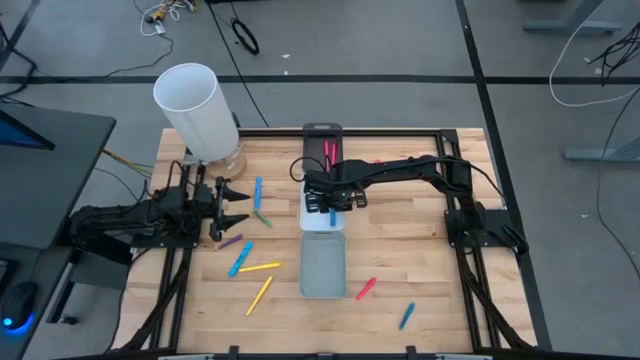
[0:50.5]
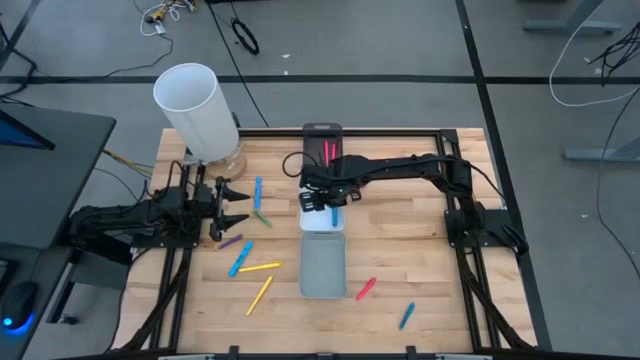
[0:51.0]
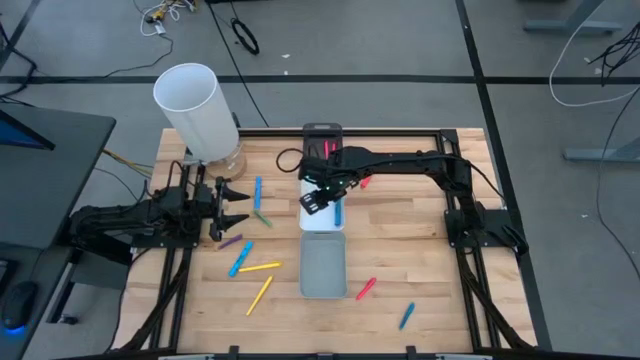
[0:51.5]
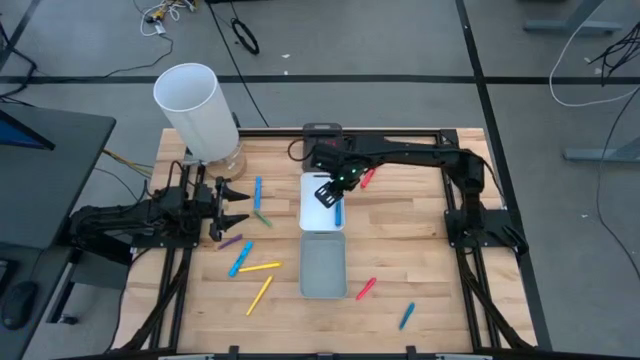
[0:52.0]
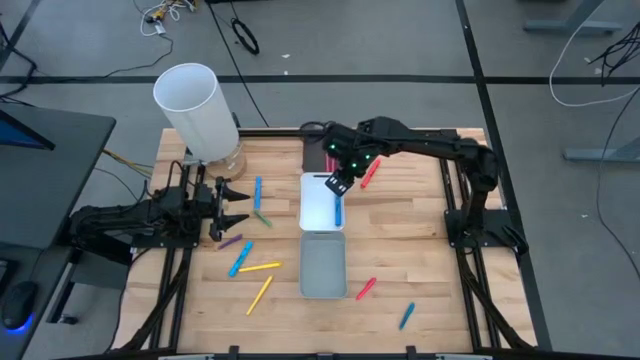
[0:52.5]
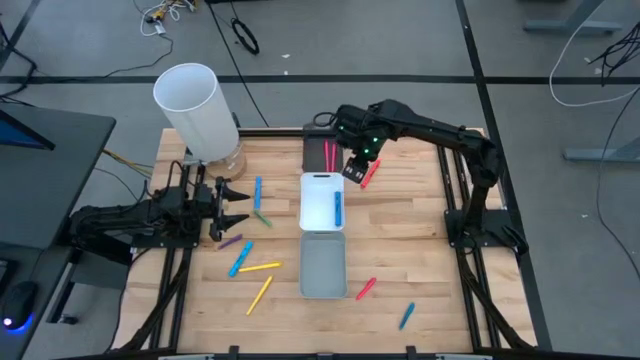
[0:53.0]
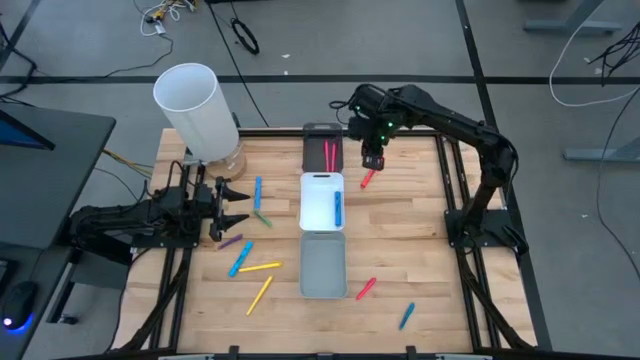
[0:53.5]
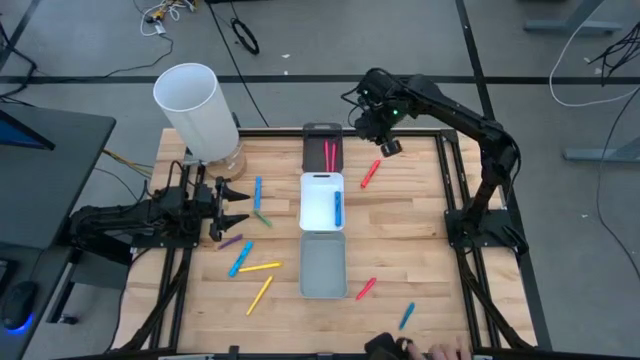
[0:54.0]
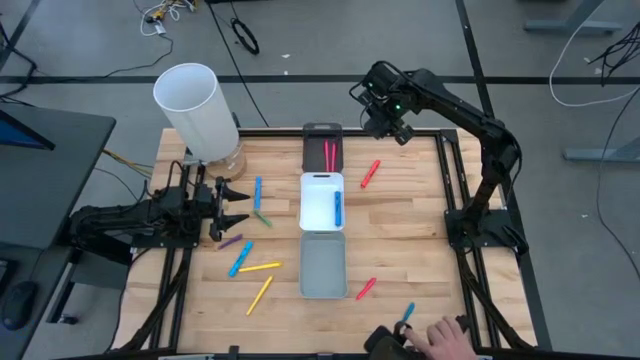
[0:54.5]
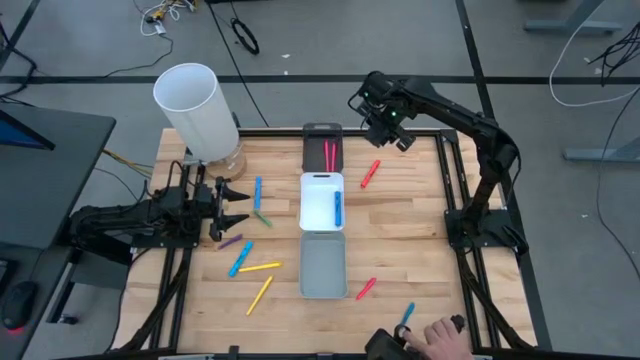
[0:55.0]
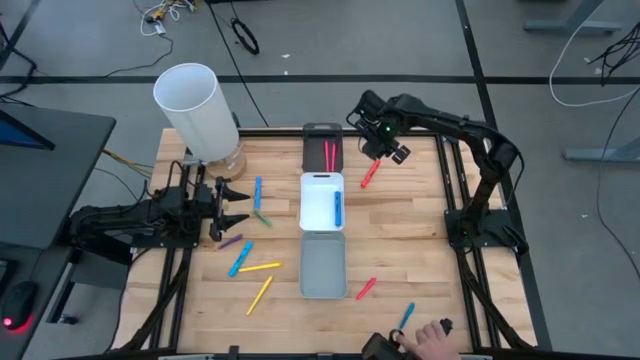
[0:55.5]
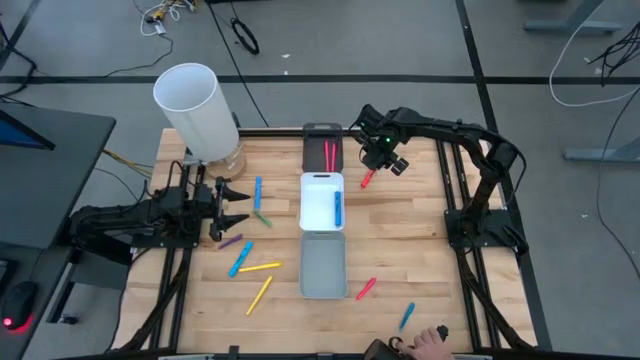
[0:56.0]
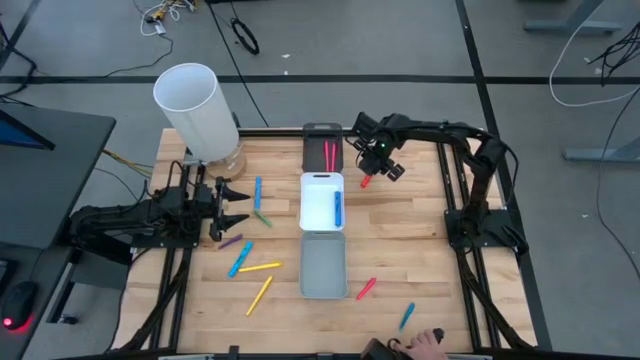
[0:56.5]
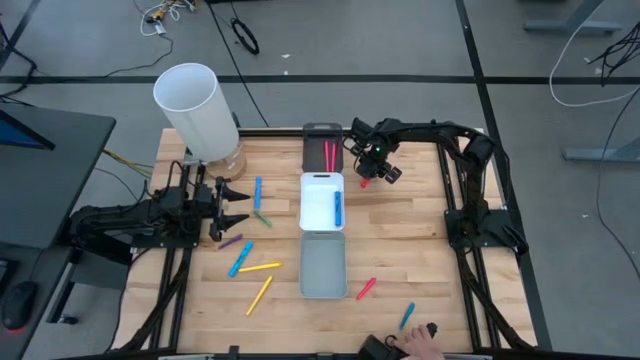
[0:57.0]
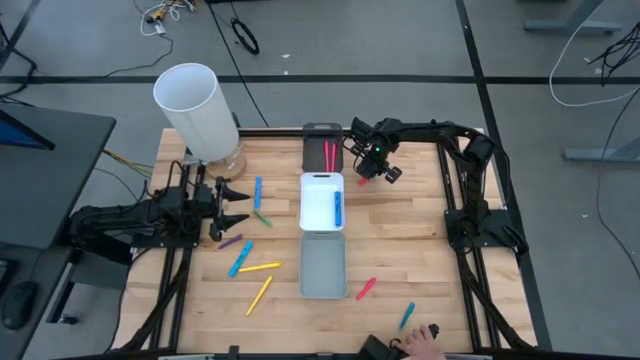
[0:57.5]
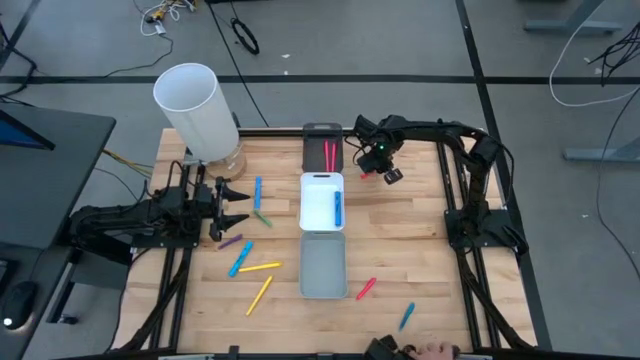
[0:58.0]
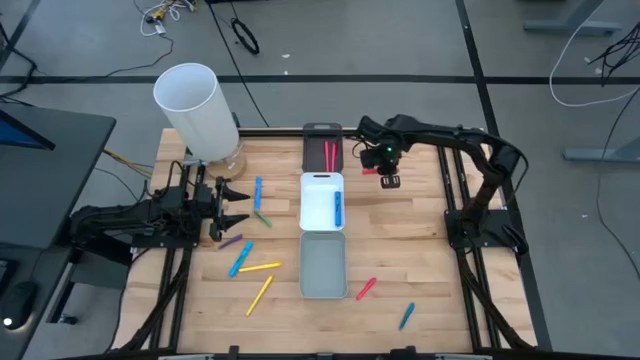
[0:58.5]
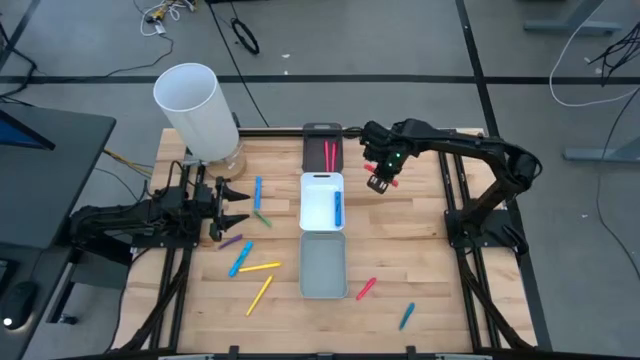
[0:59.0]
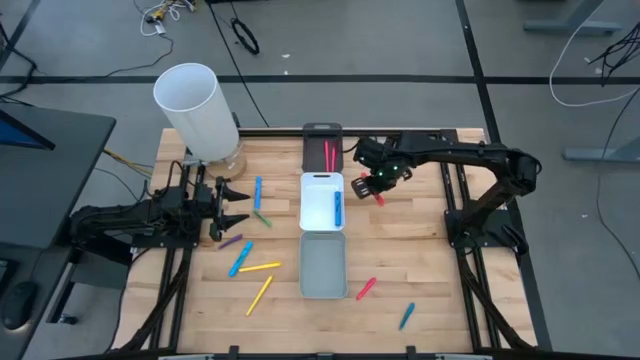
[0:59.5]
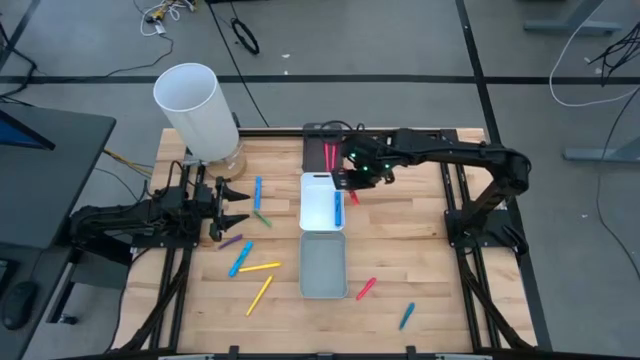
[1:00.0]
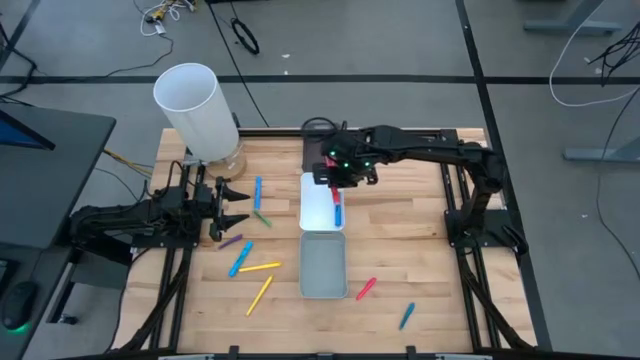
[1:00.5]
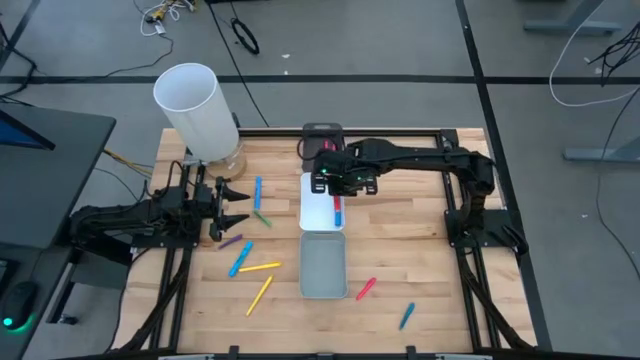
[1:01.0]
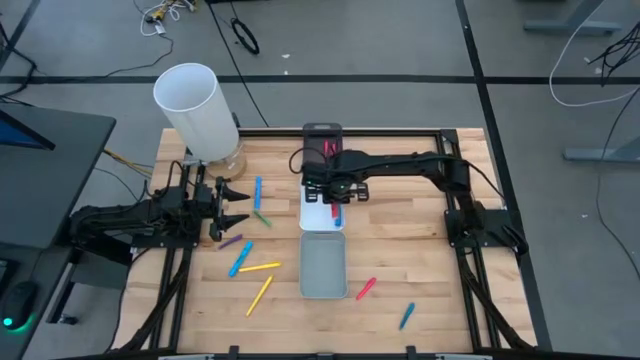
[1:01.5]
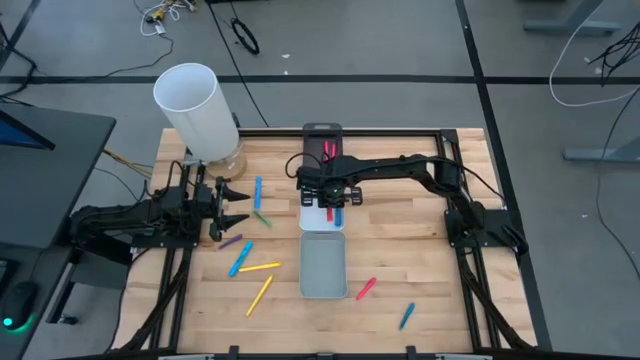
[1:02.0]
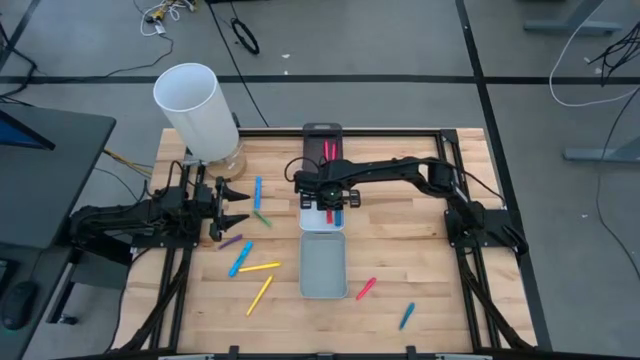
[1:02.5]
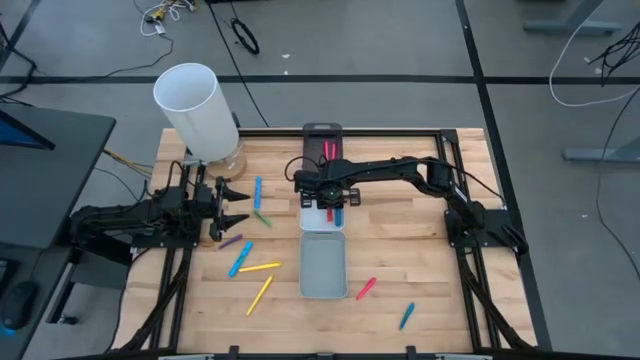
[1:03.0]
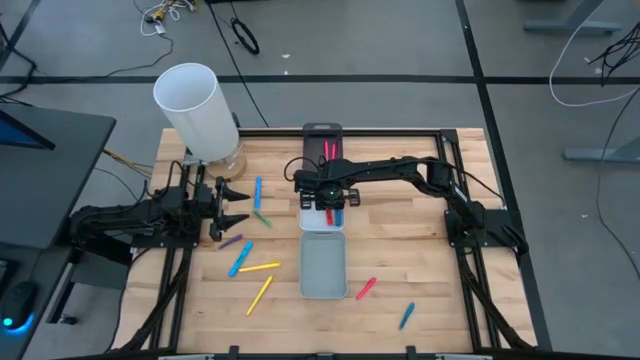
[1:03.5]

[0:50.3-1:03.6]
Task: Pick & Place Markers
Put the red highlighter pen into the white bin

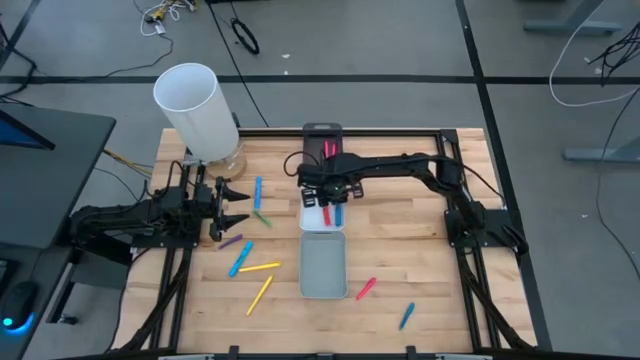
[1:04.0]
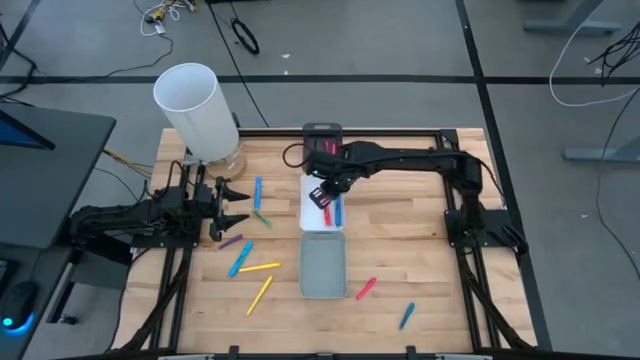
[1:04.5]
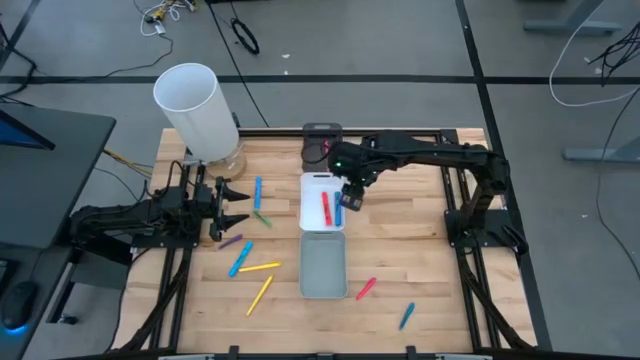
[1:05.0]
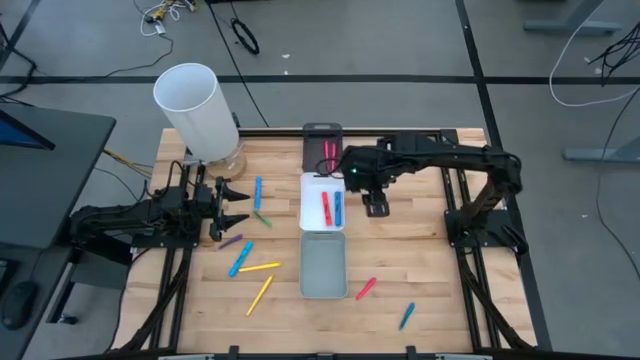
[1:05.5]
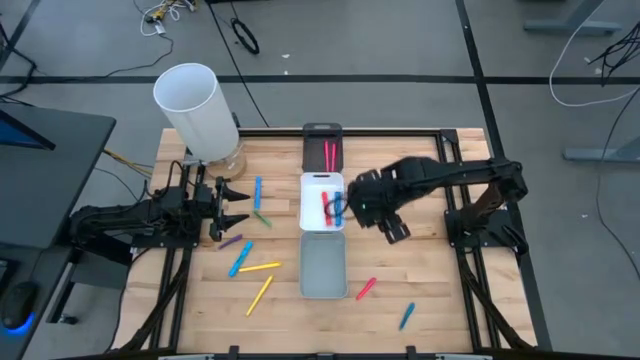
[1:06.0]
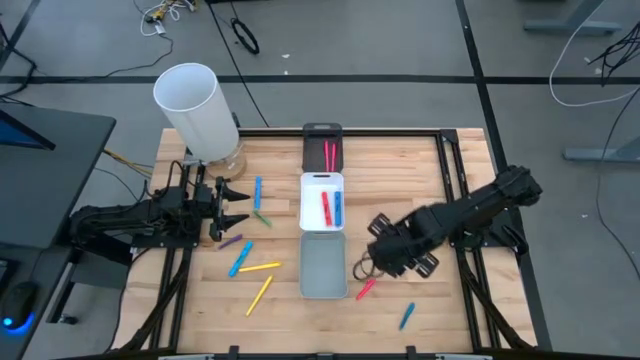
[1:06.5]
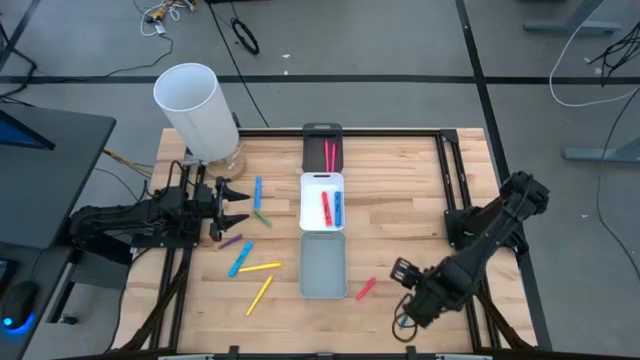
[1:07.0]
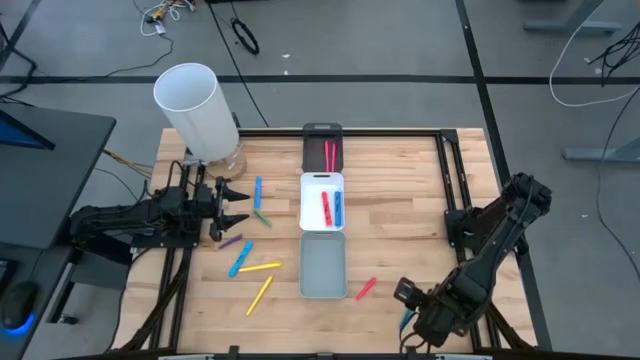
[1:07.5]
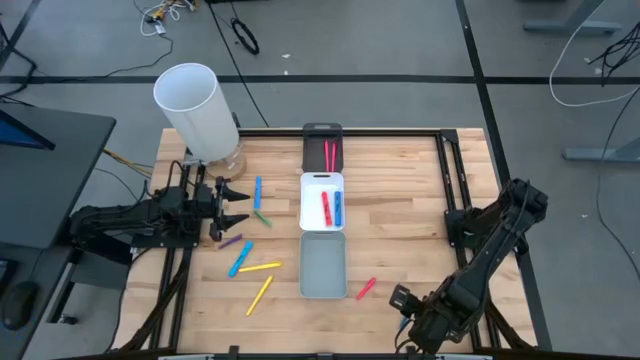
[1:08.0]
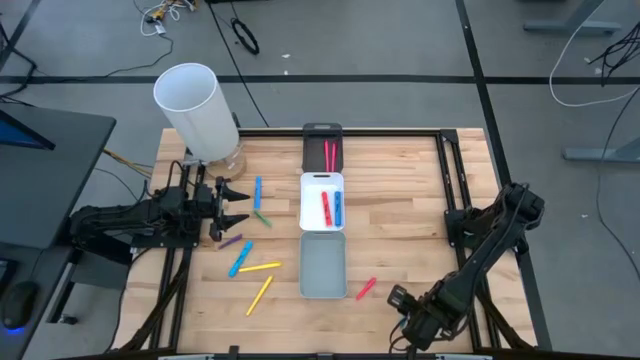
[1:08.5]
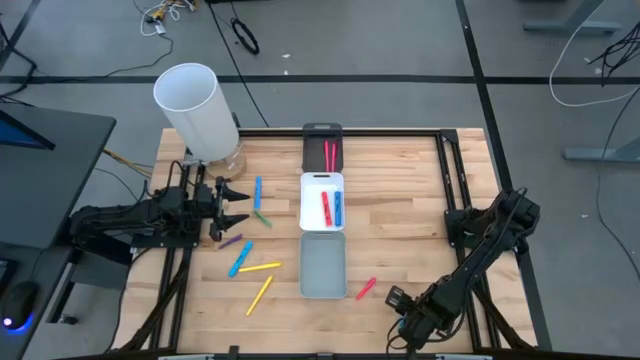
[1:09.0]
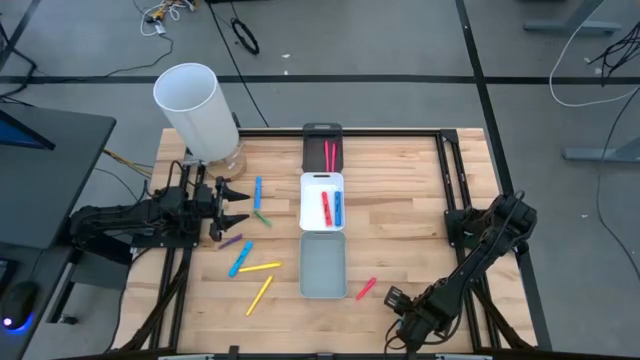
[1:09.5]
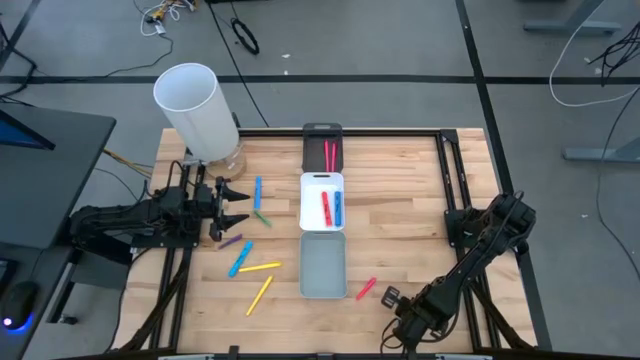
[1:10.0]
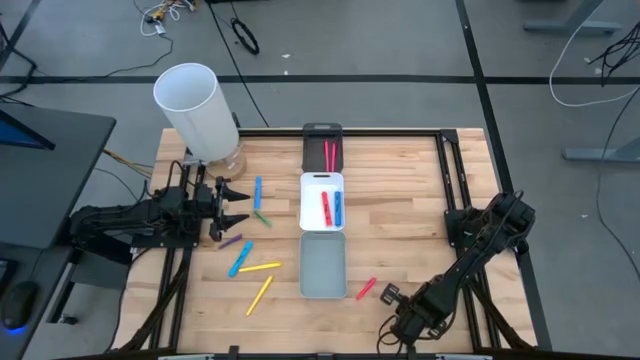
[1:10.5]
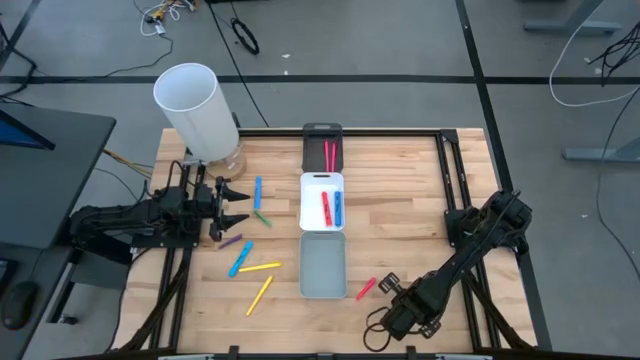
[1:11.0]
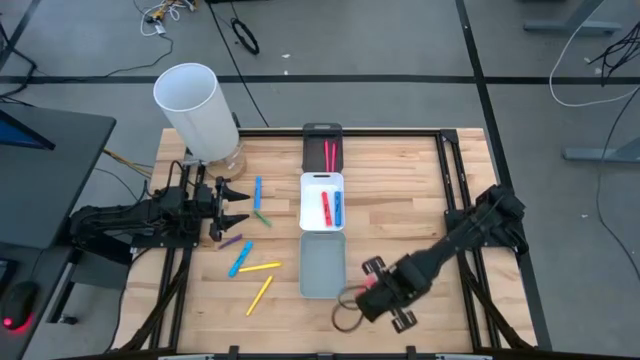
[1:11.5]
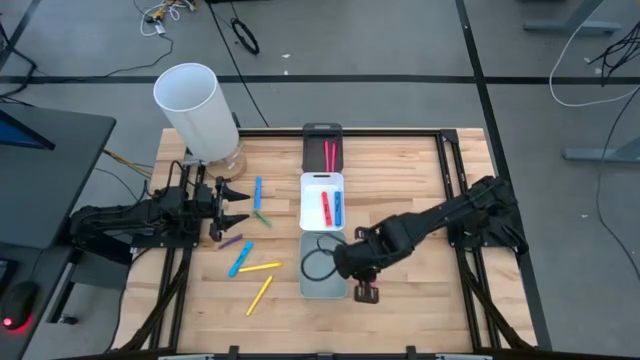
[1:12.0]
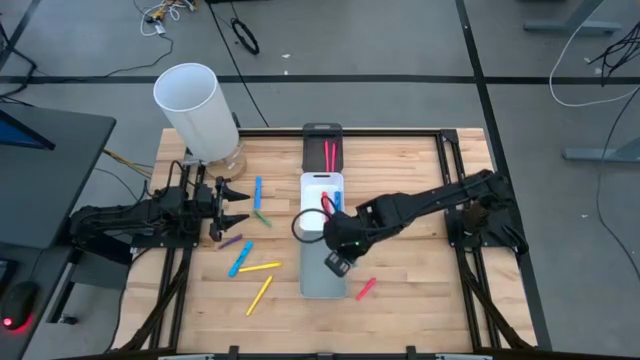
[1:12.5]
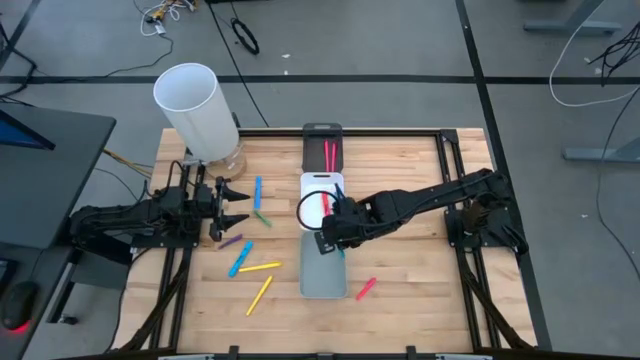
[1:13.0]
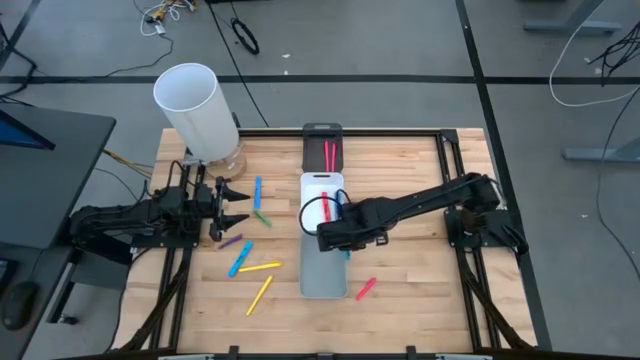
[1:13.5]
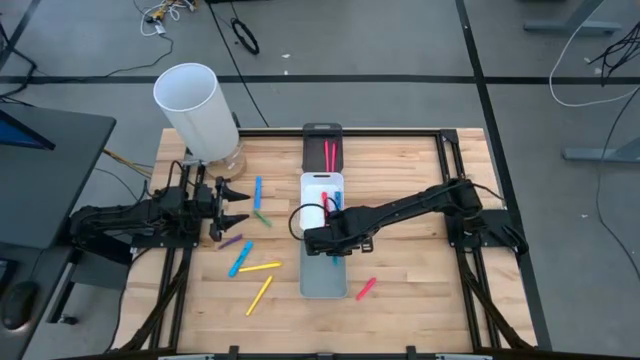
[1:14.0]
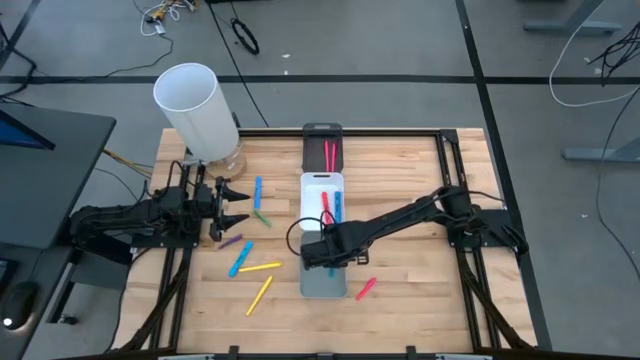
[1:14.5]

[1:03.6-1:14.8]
Put the blue pen into the gray bin
